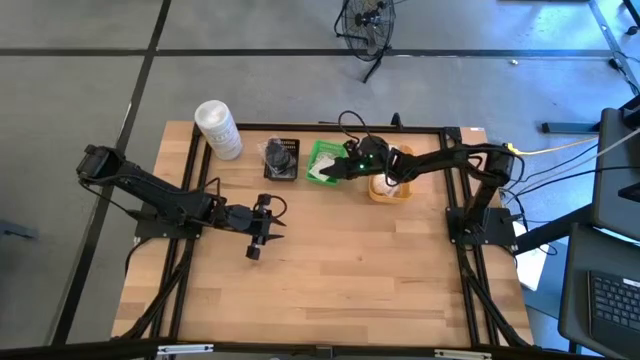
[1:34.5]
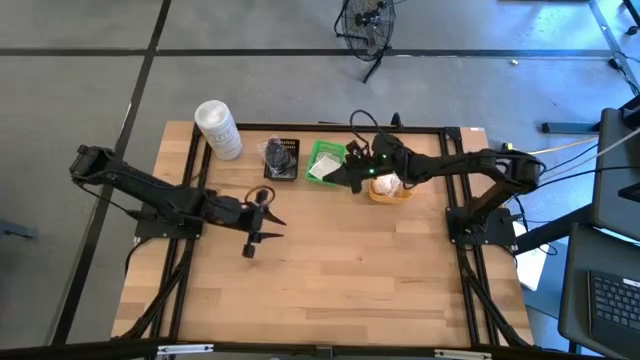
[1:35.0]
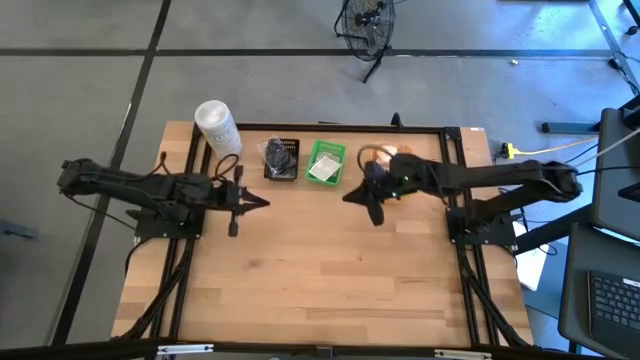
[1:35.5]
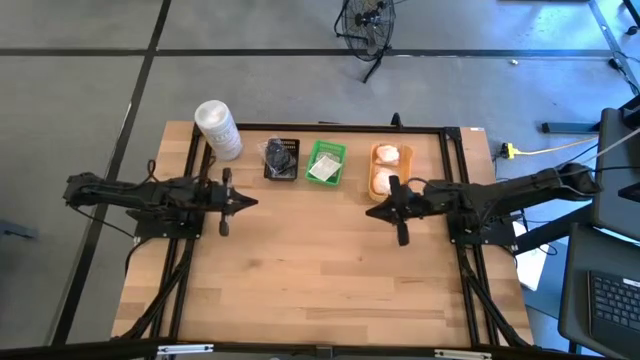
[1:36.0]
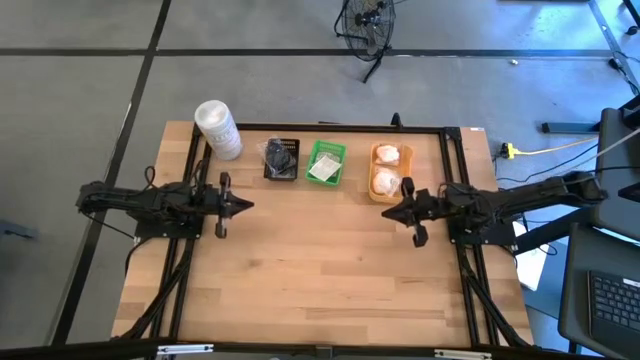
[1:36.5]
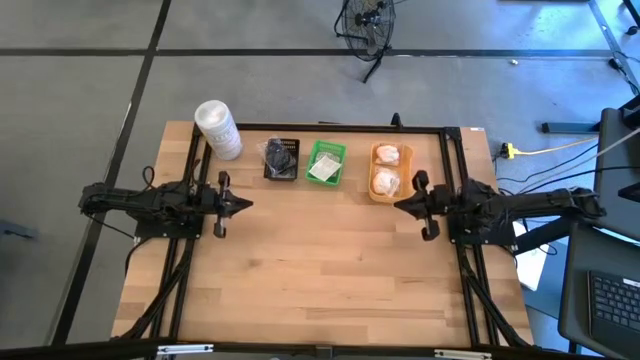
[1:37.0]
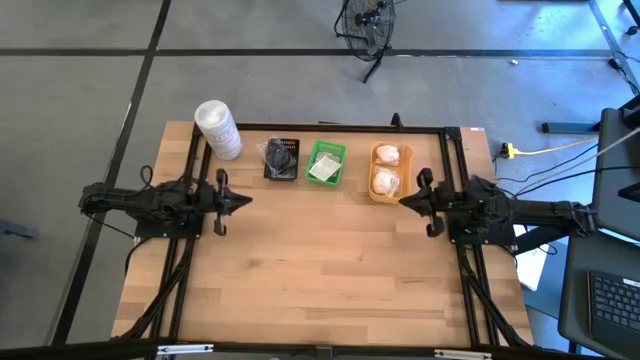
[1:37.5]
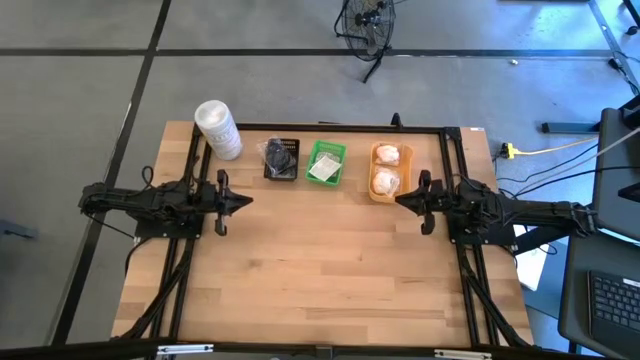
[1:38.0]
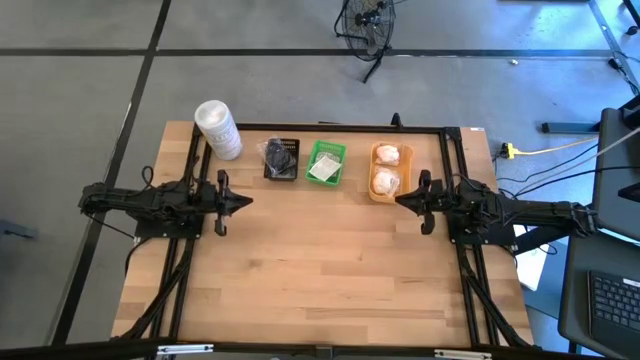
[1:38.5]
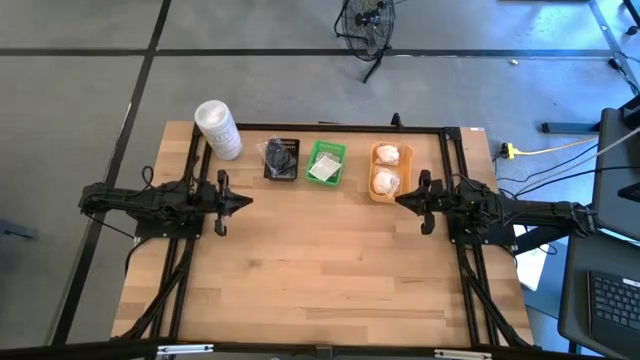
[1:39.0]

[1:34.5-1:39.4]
Task: Pick & Place Travel size toiletries
Return to Home Position

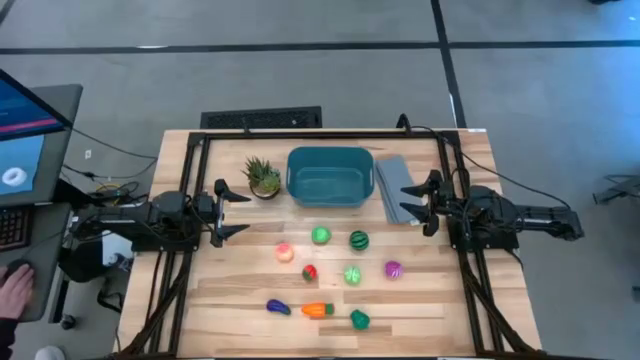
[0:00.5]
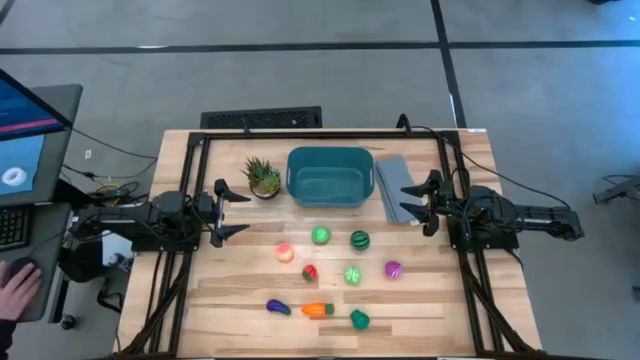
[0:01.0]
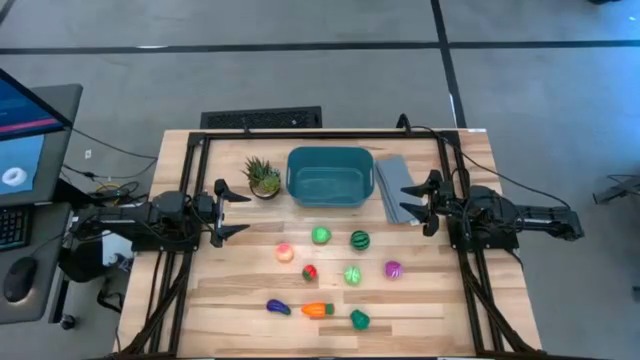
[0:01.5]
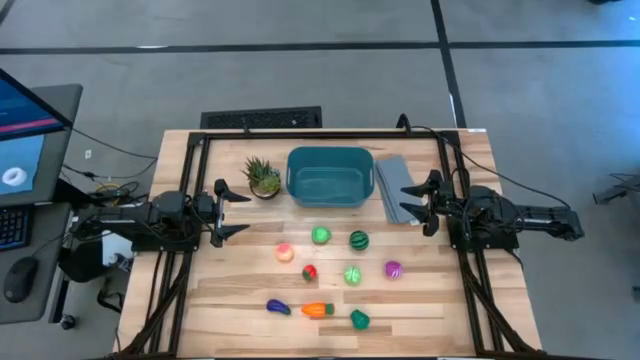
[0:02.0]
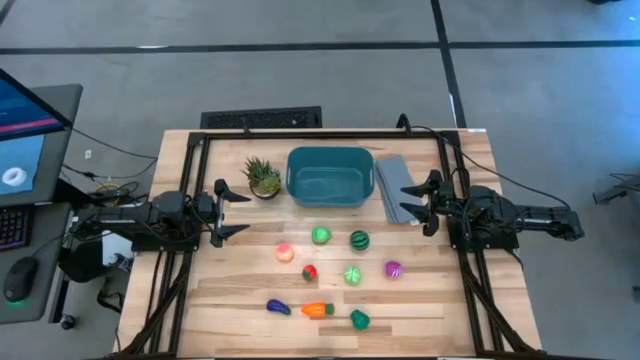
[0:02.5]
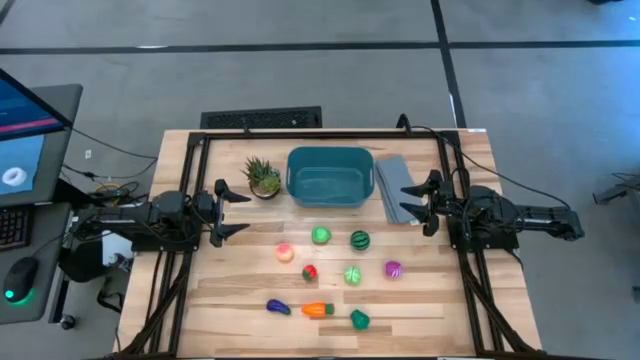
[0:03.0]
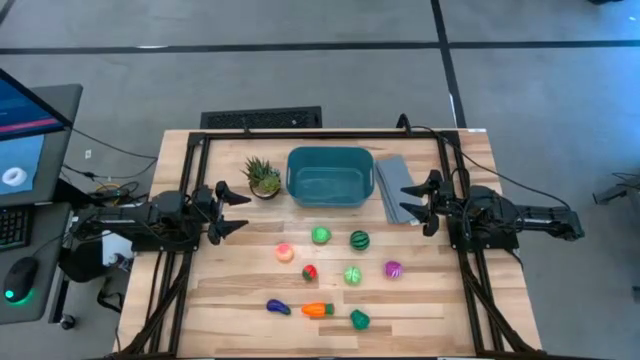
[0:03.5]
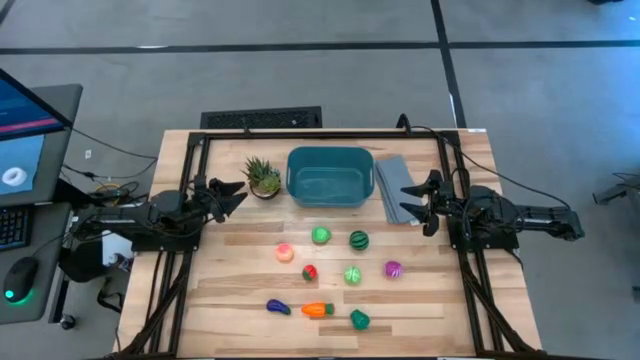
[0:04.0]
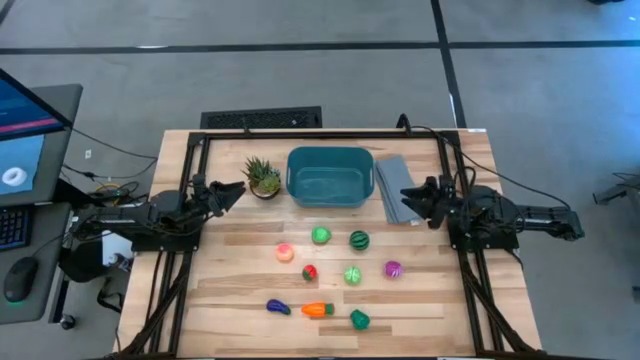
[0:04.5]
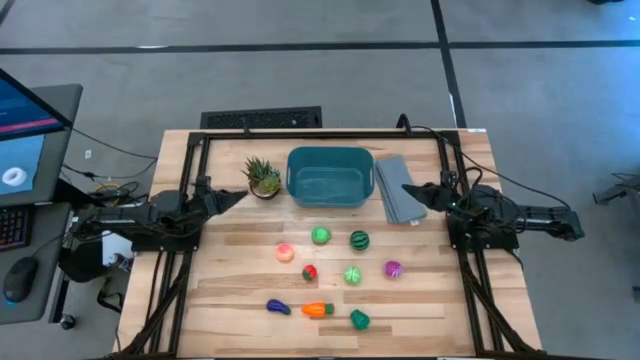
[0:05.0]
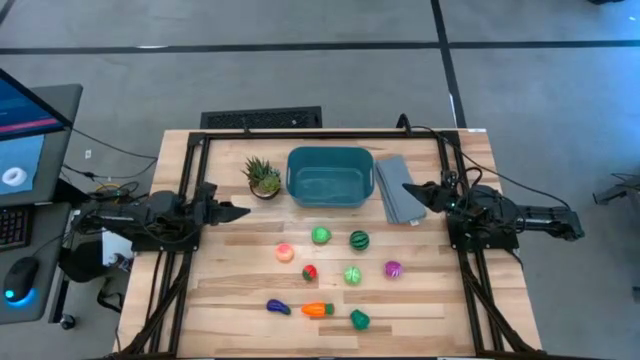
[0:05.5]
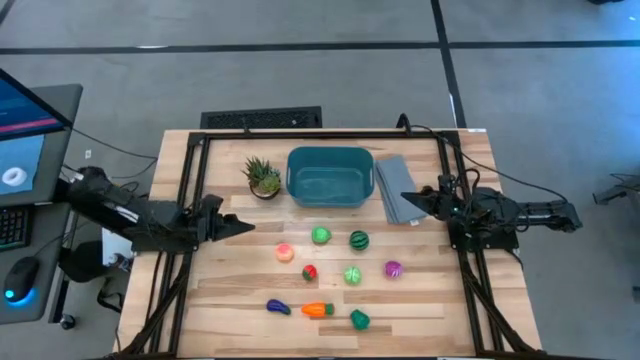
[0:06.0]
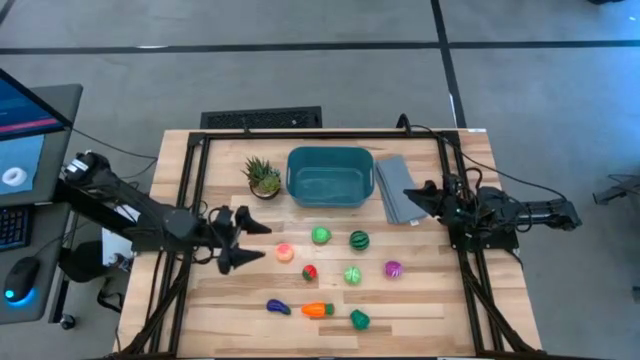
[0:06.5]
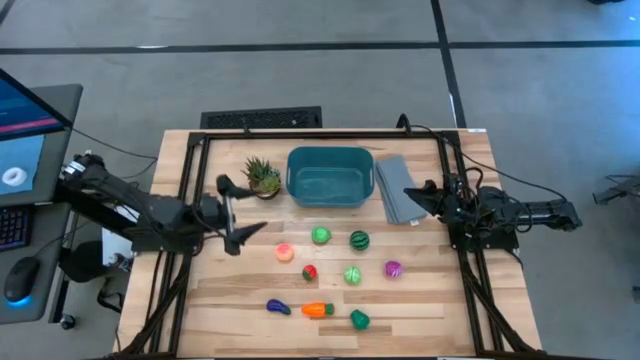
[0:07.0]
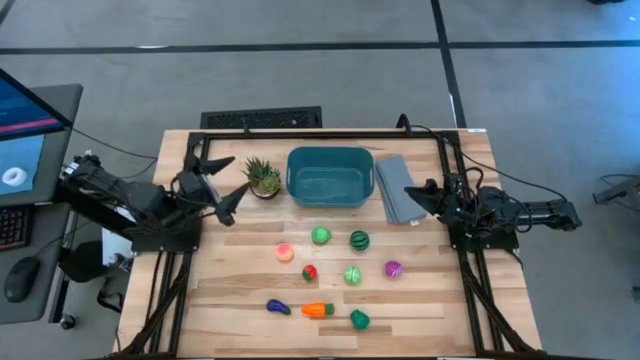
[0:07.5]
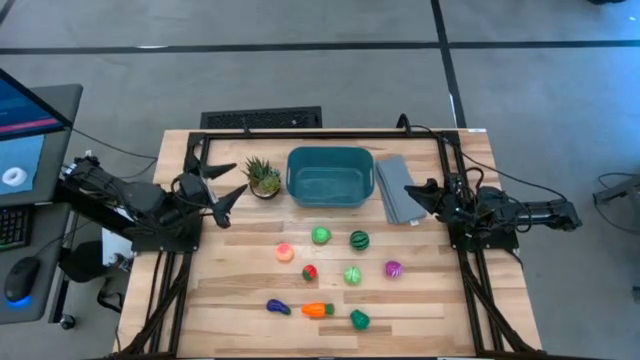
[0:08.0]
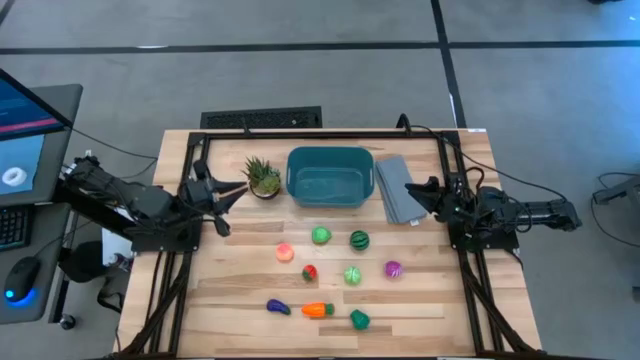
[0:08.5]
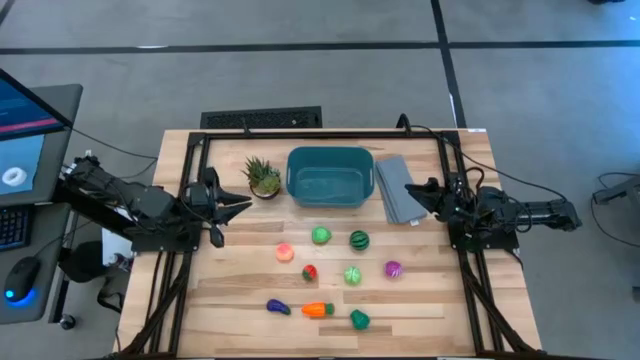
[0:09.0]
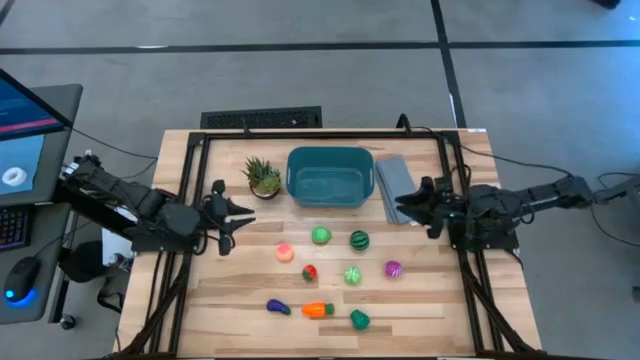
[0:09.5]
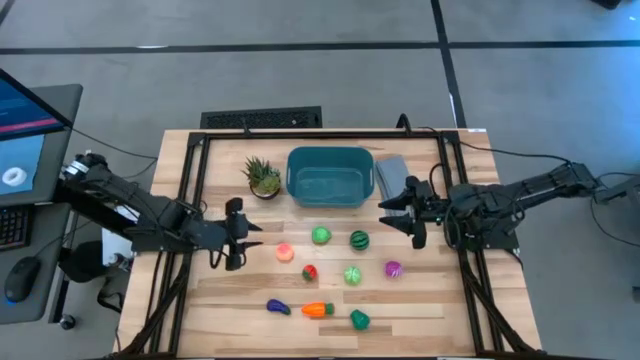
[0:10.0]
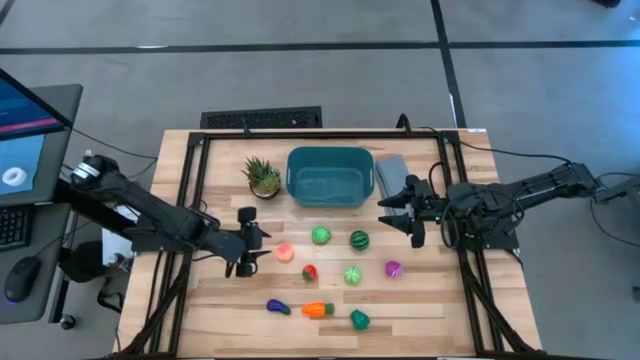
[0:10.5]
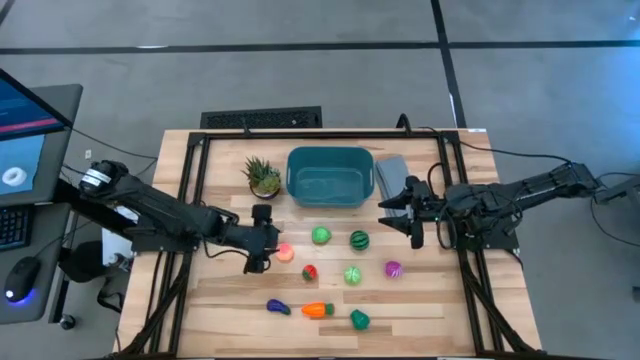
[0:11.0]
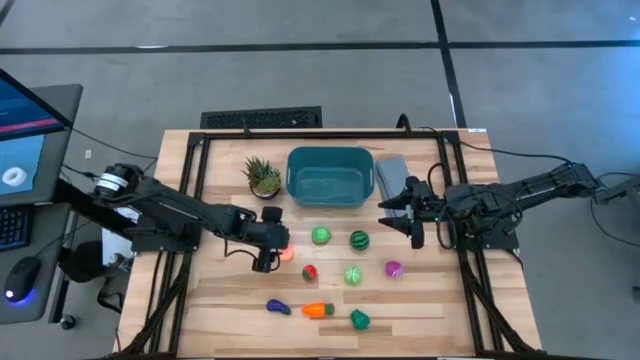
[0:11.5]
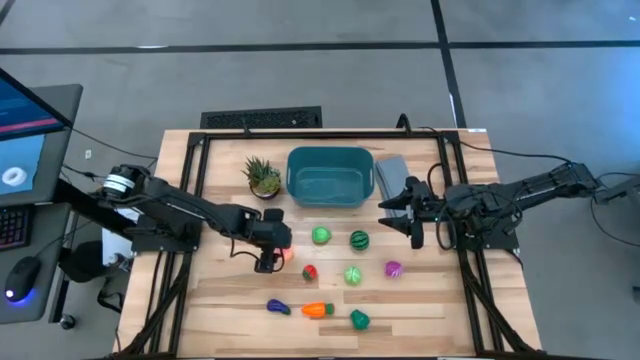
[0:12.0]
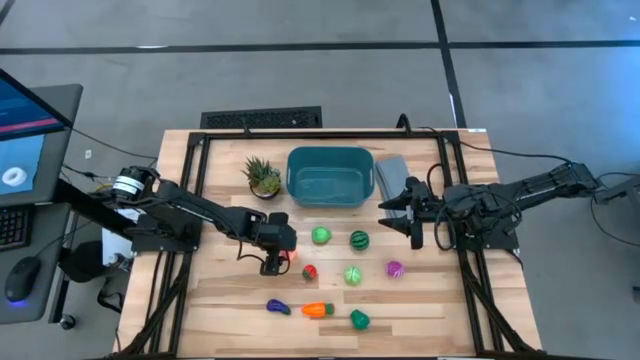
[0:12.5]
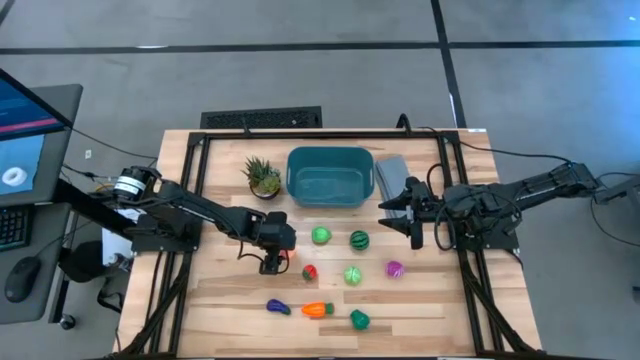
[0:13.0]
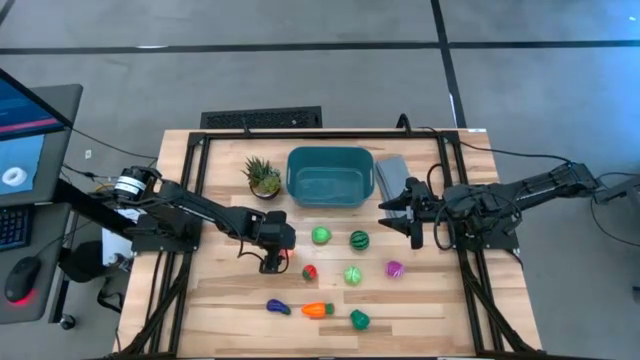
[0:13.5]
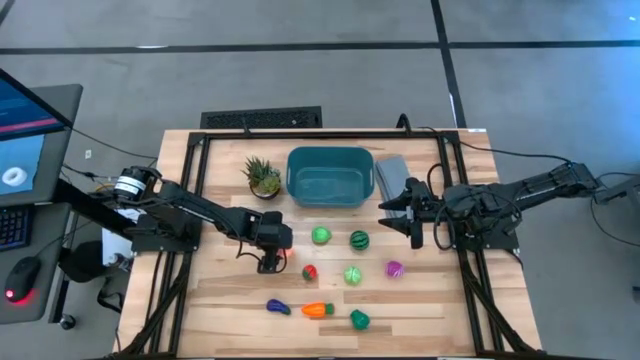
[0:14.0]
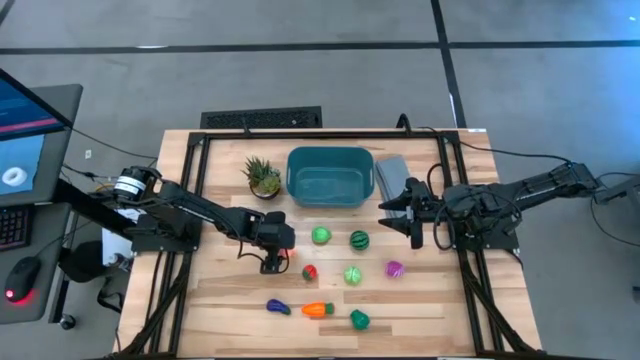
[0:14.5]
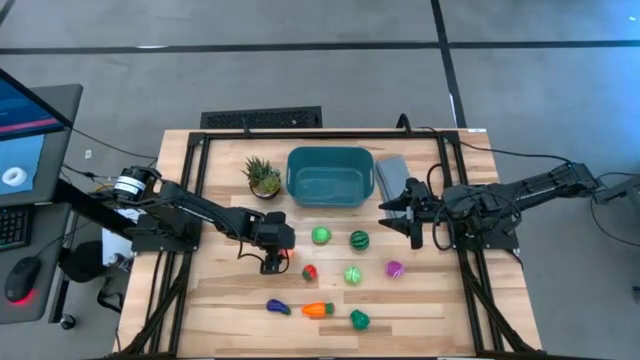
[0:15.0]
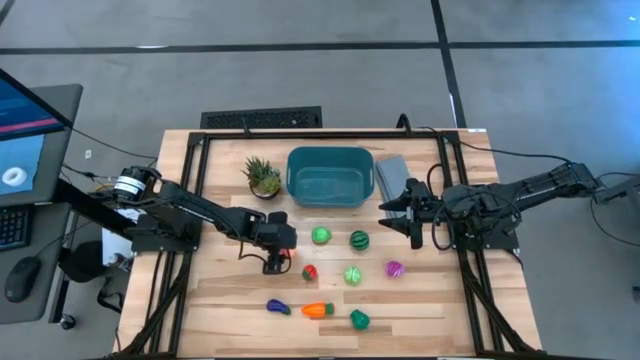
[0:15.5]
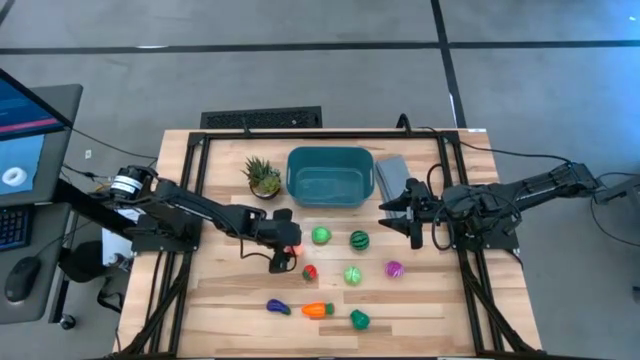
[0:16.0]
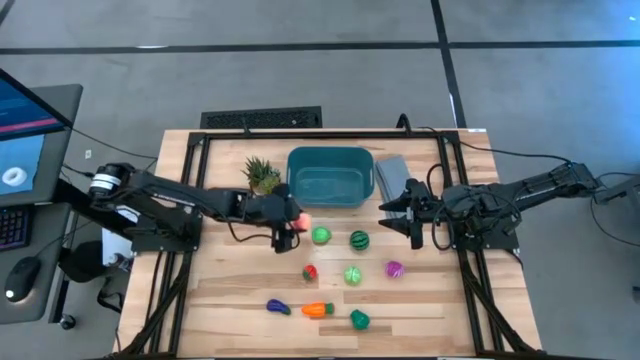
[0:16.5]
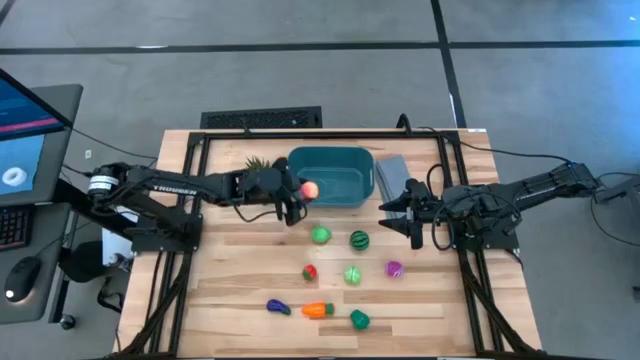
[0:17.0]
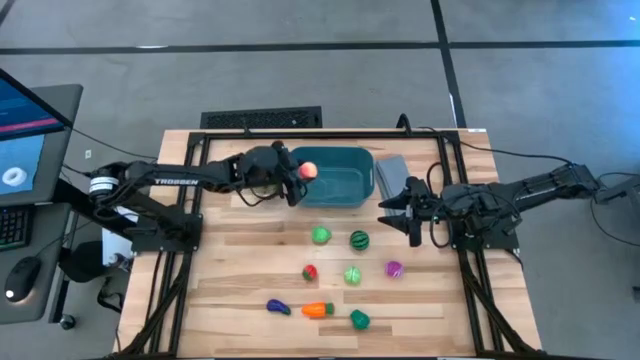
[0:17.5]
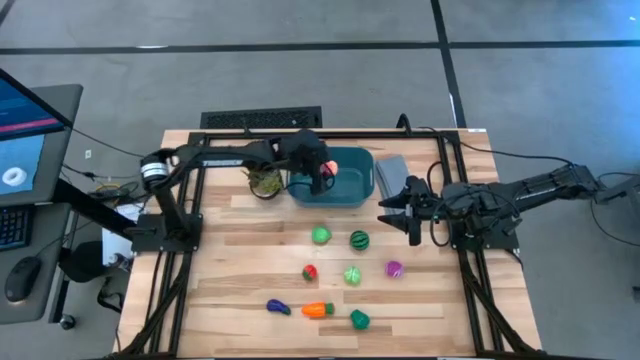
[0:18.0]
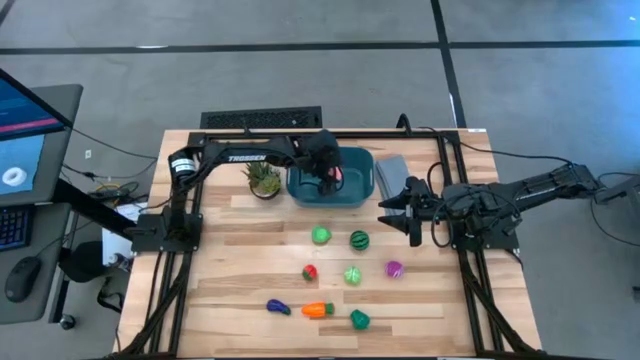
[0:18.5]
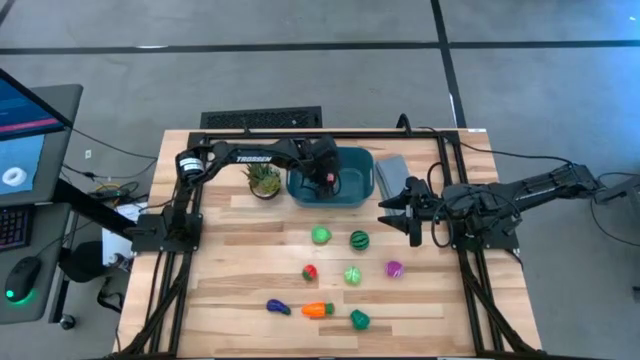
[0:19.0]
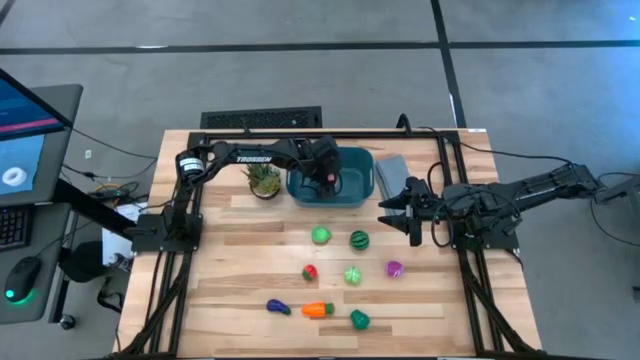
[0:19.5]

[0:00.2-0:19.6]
Task: Pick and placing Produce into tupperware
Put the peach into the blue bin
